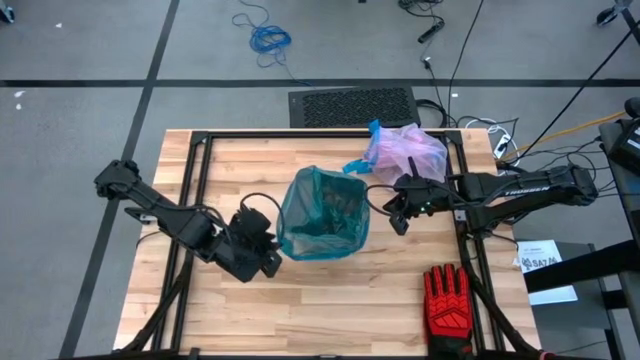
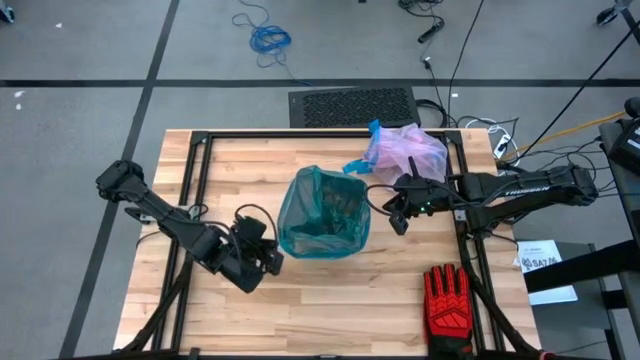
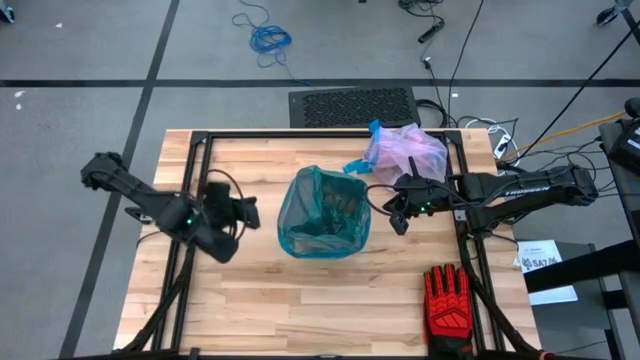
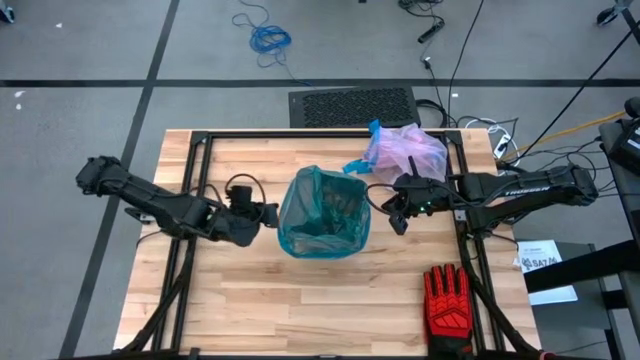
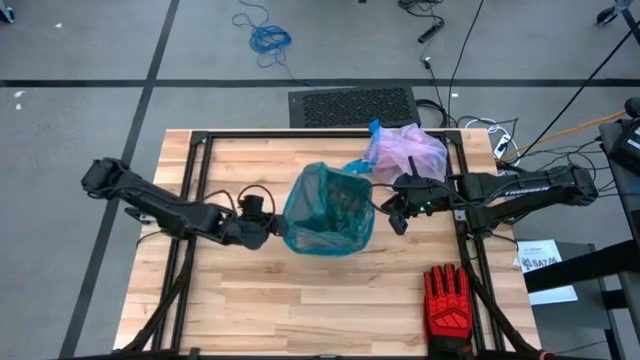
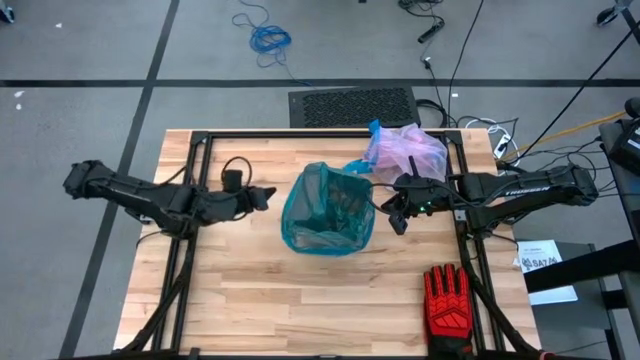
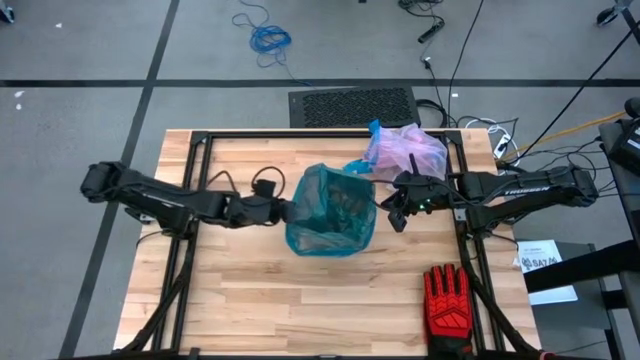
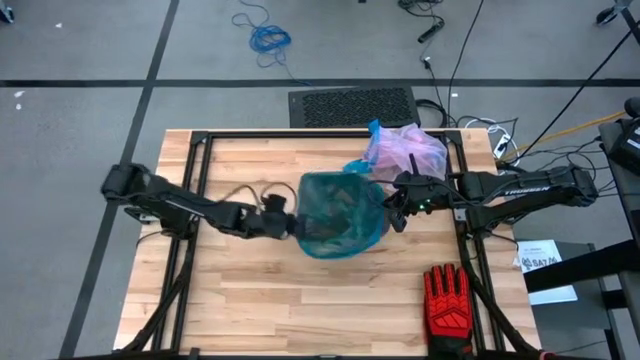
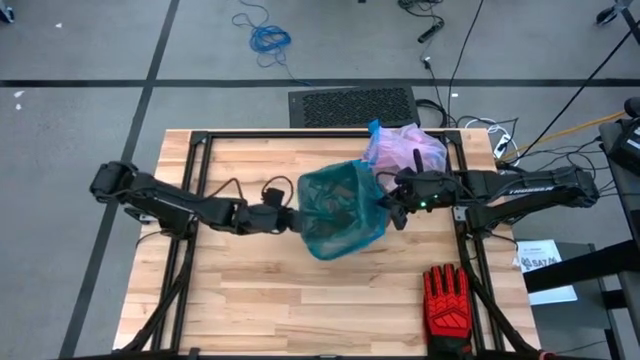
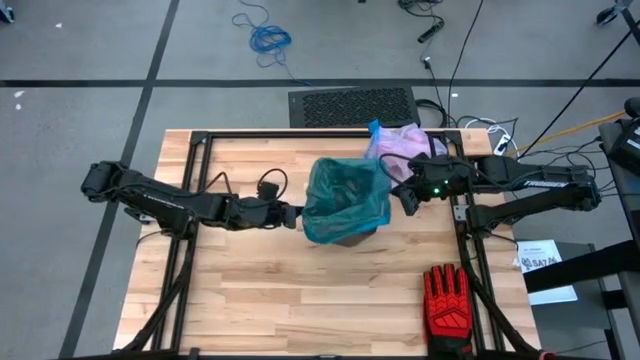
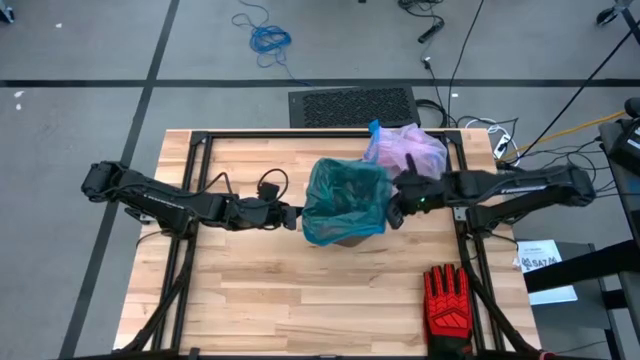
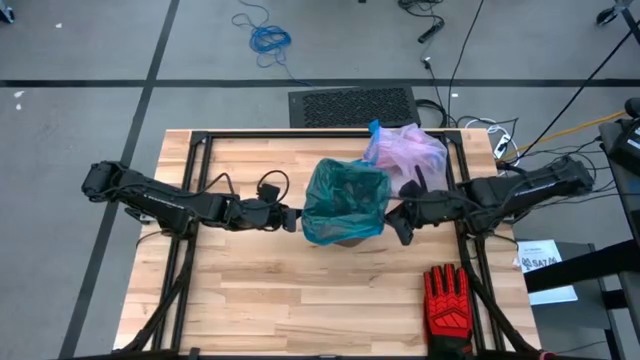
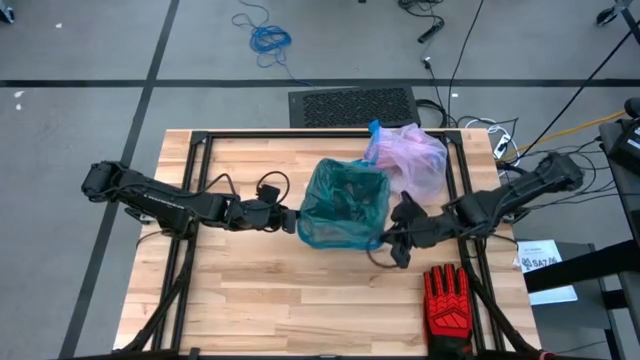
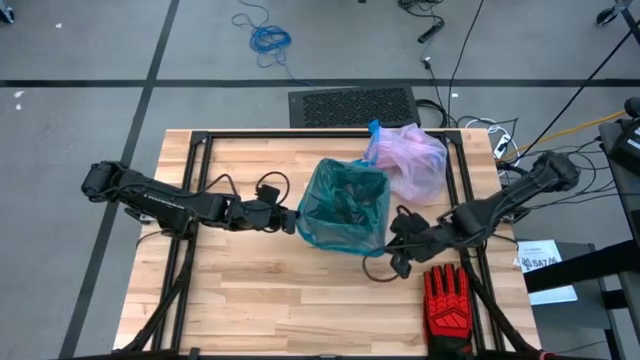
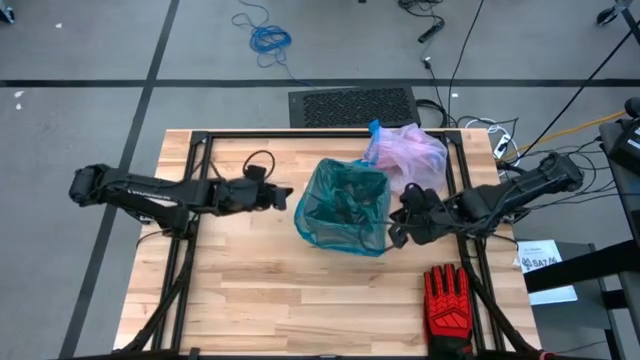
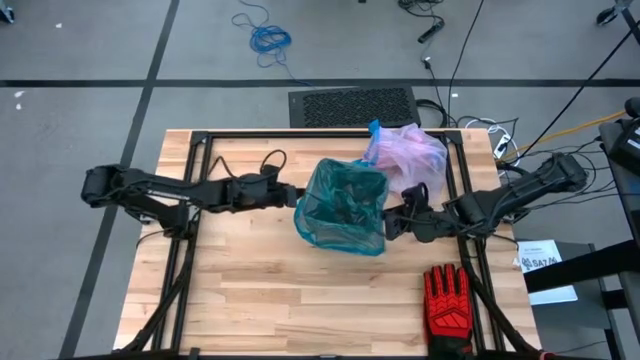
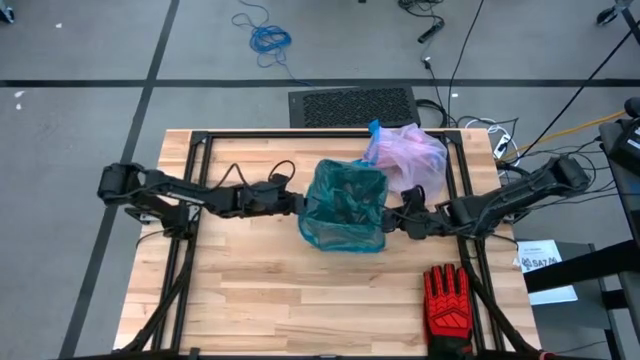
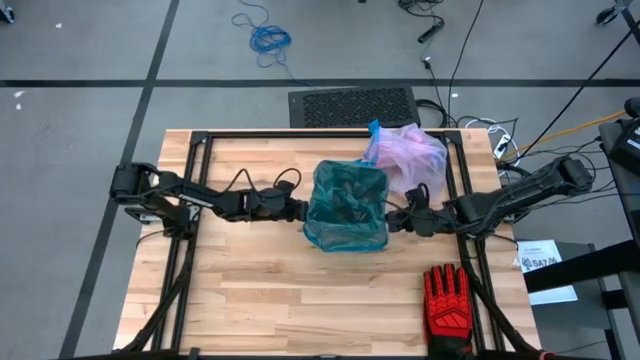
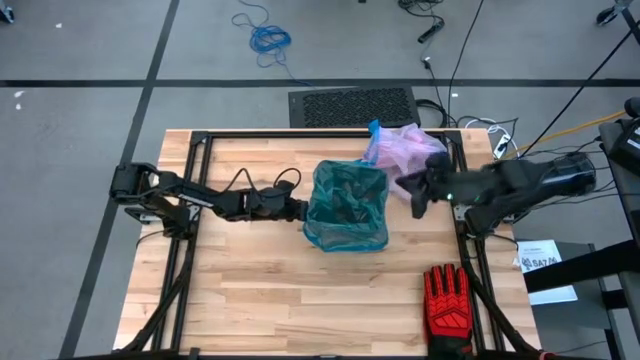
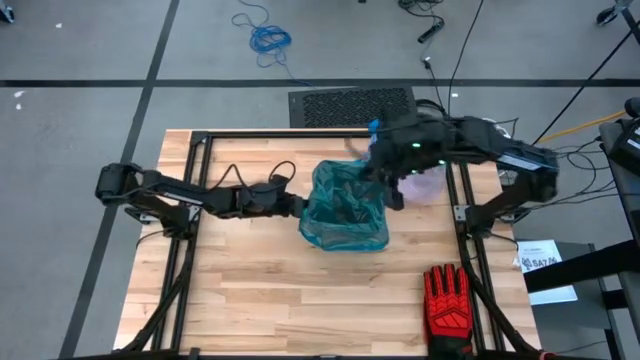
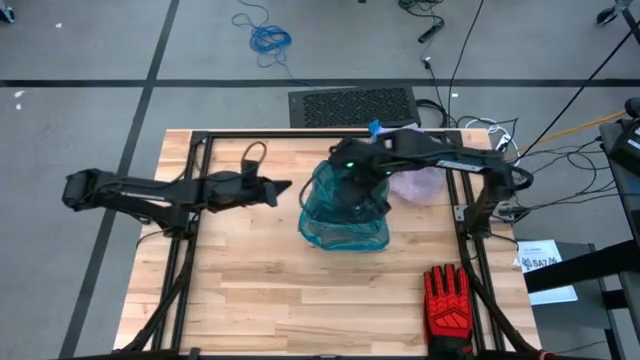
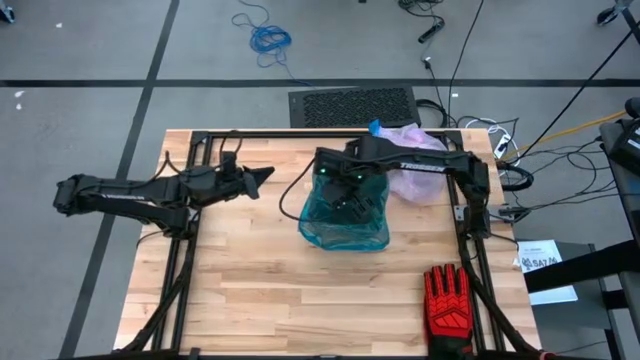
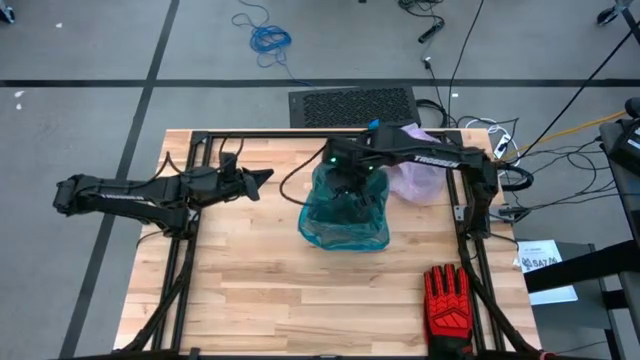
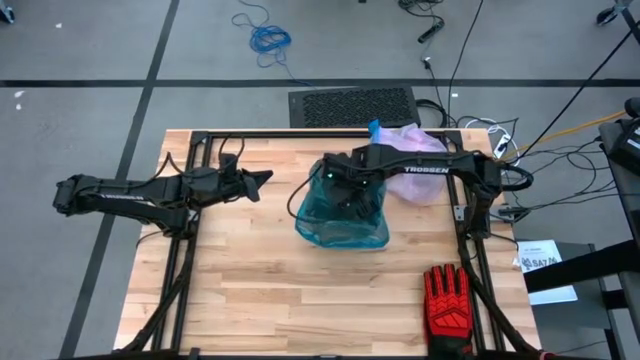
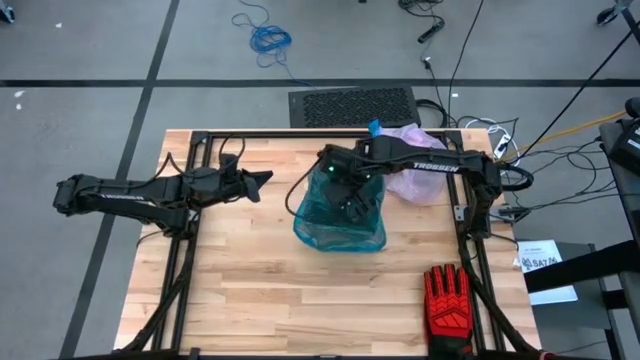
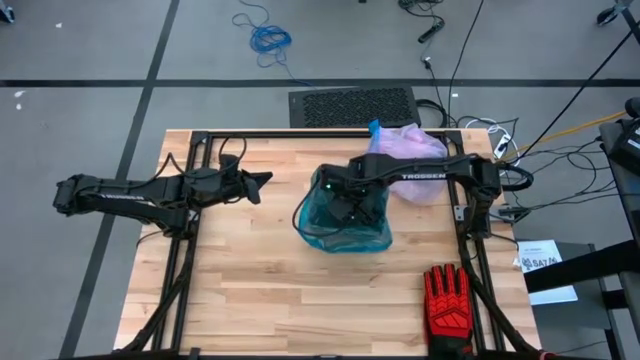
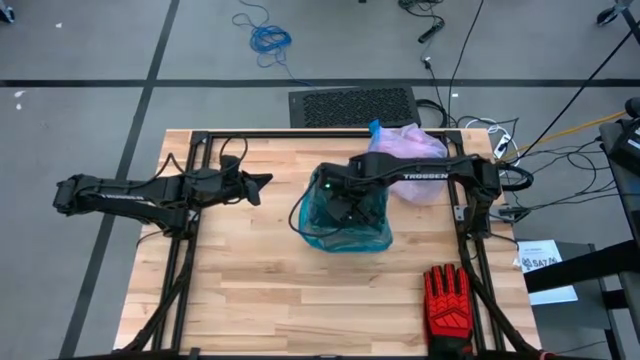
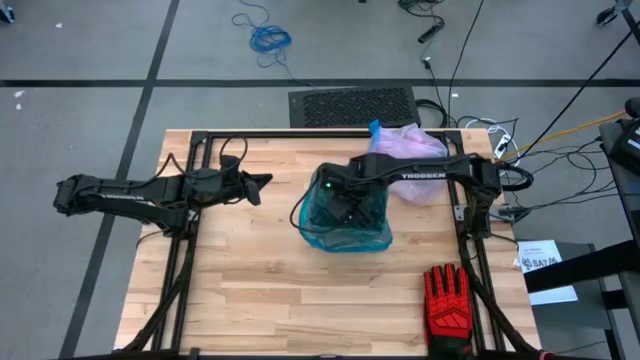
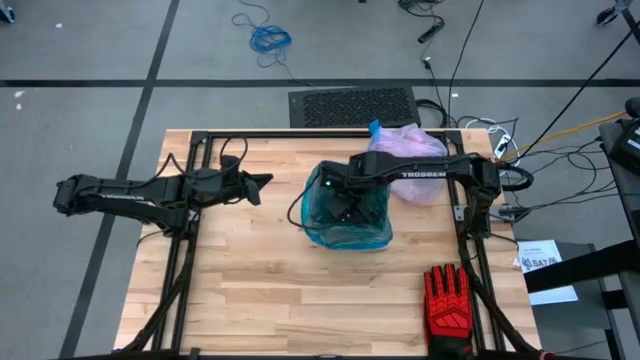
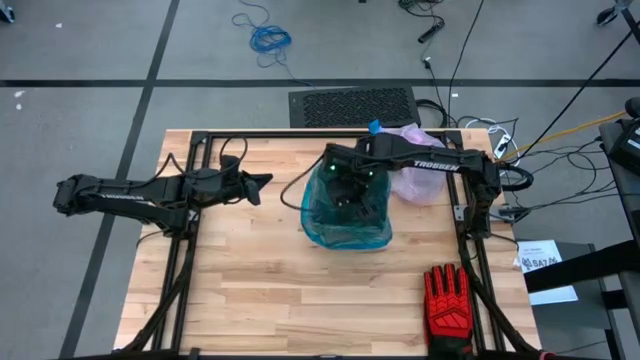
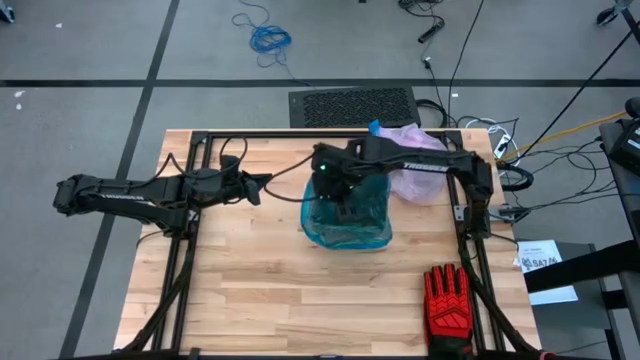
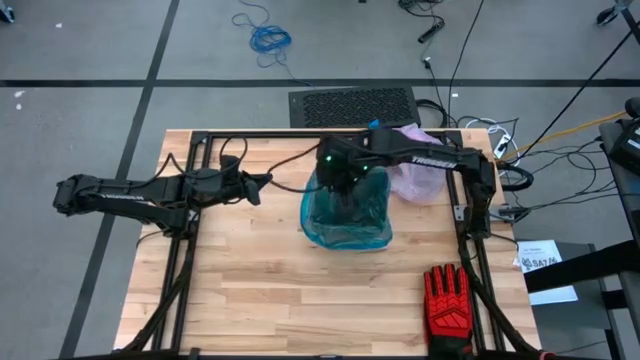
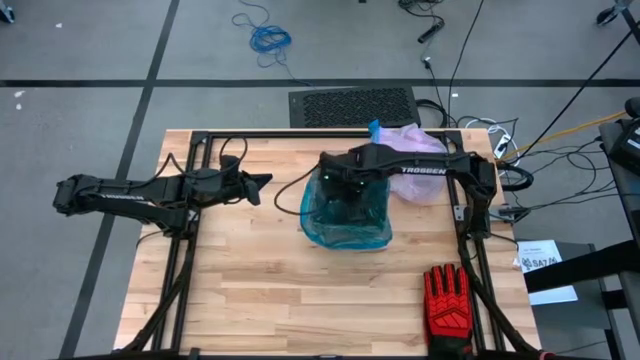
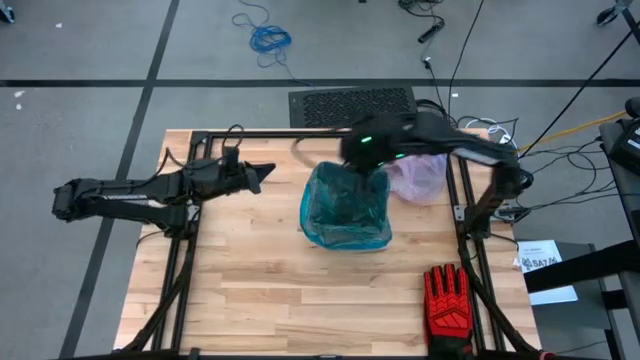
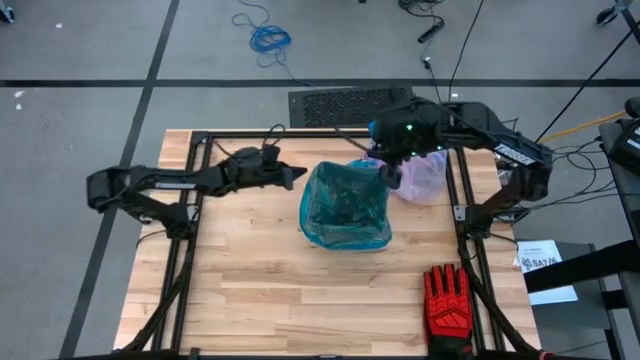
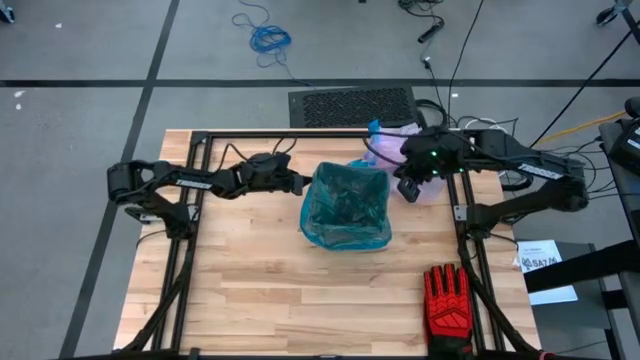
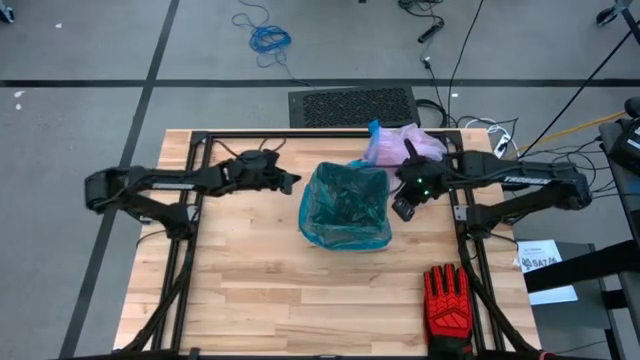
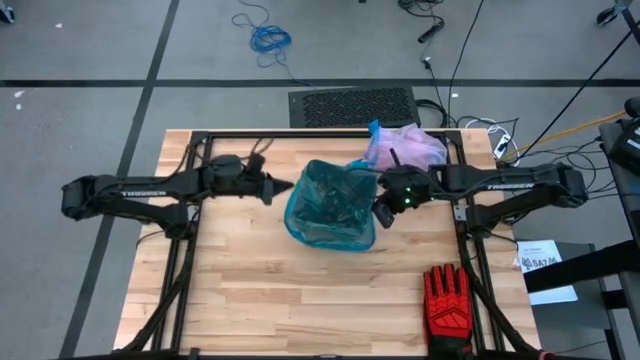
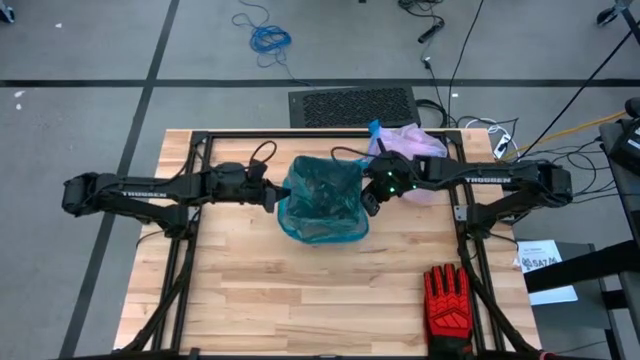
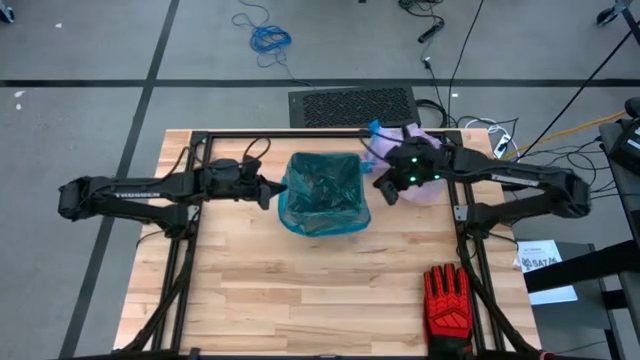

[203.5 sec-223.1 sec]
Task: place trash/remove bag and relplace
Insert a new trash bag into the bin

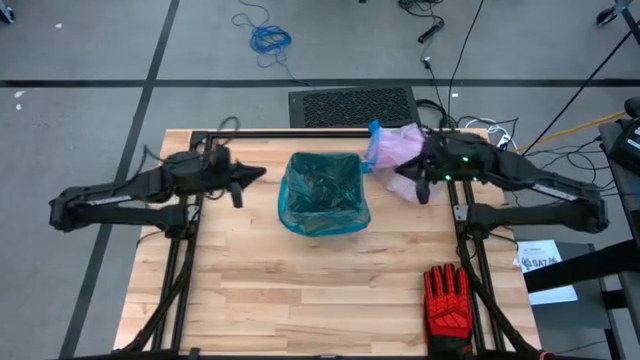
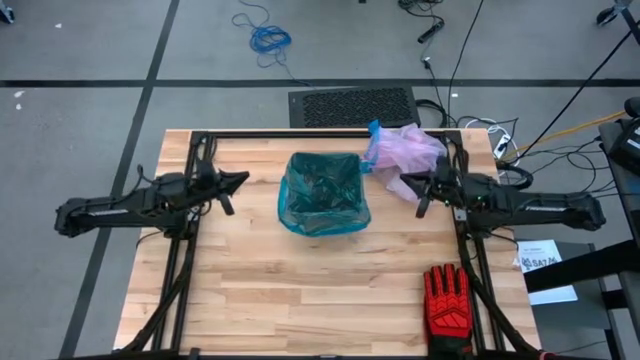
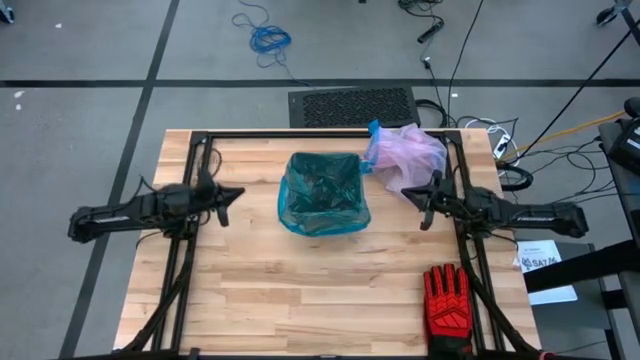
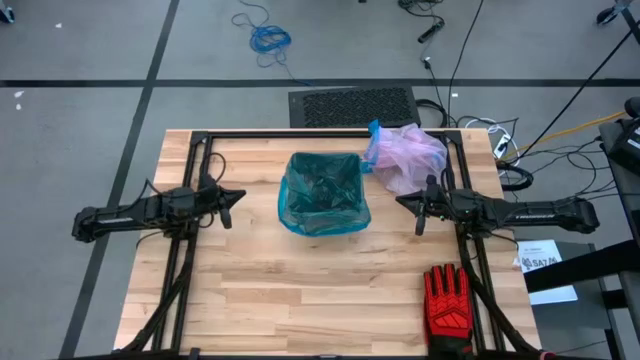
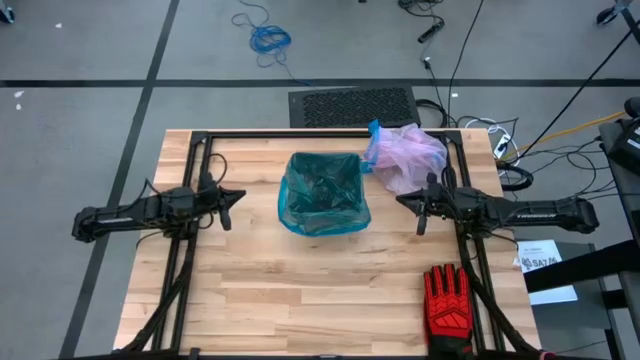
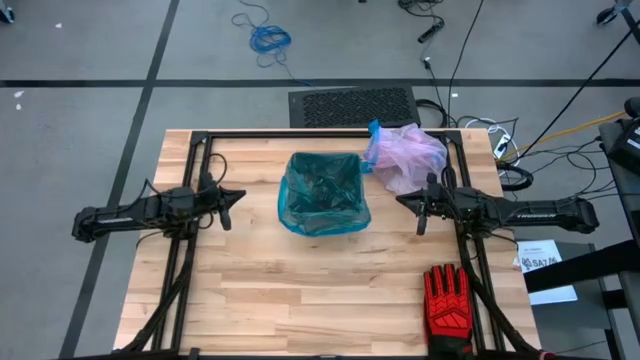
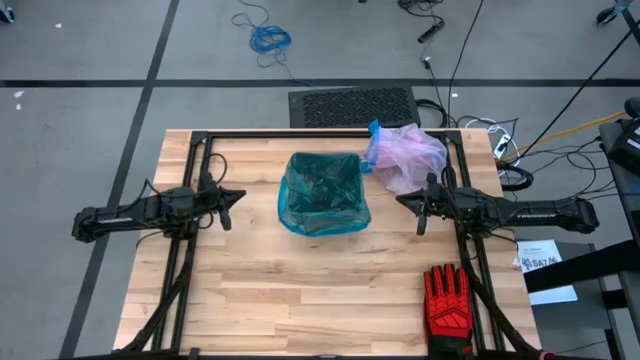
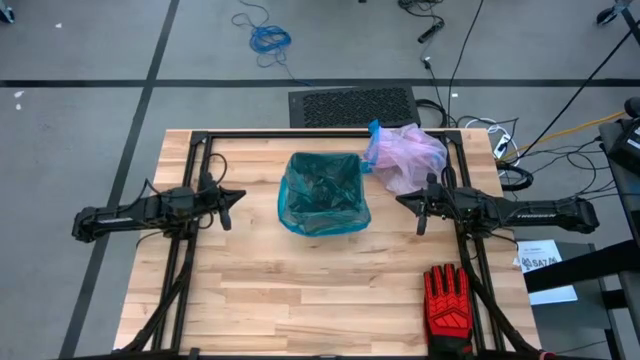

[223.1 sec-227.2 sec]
Return to Home Position
